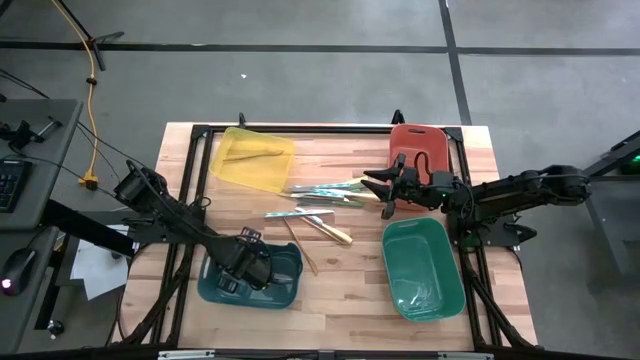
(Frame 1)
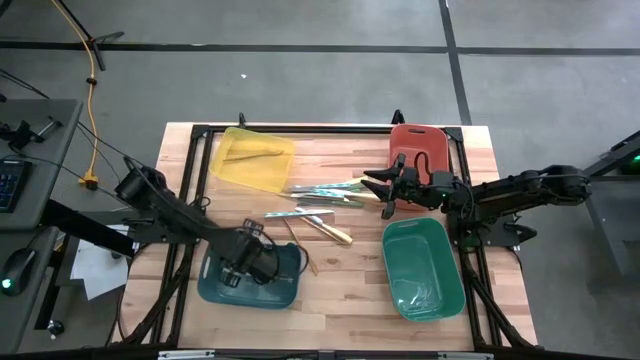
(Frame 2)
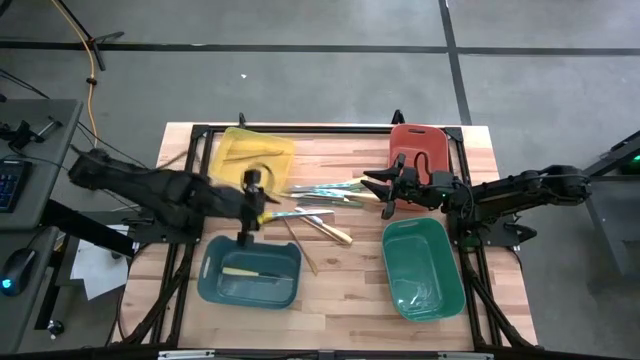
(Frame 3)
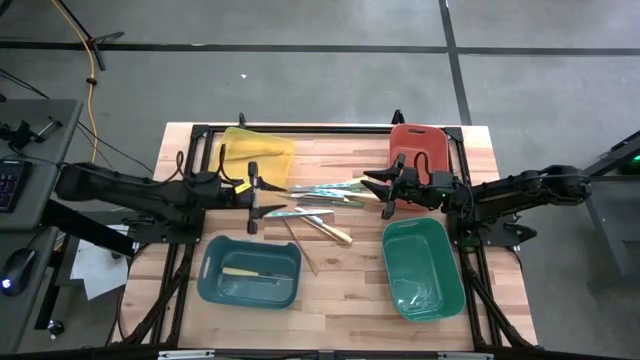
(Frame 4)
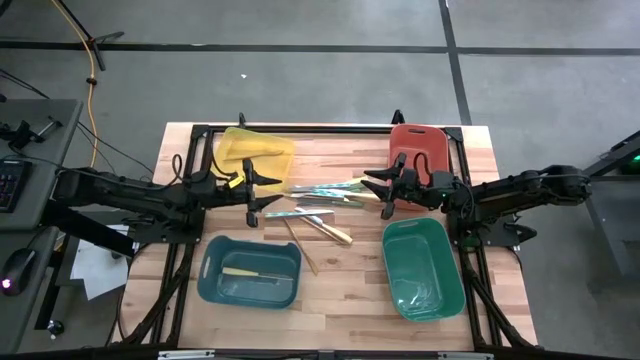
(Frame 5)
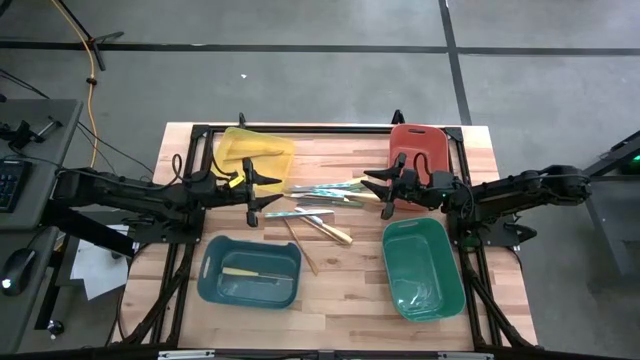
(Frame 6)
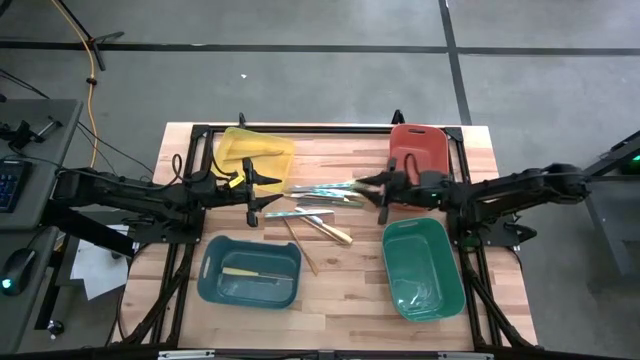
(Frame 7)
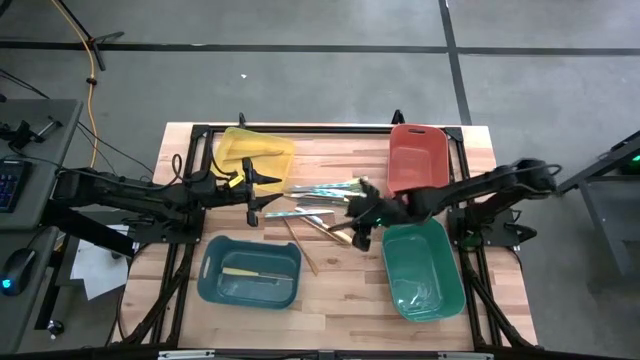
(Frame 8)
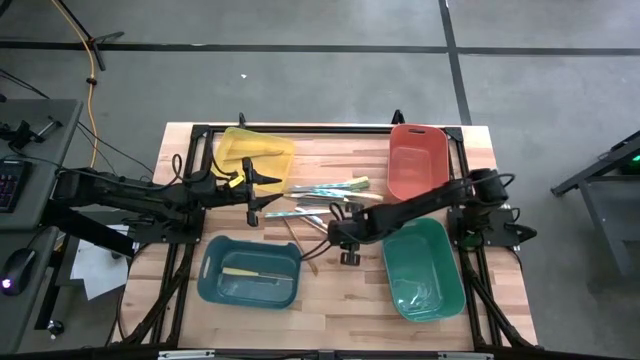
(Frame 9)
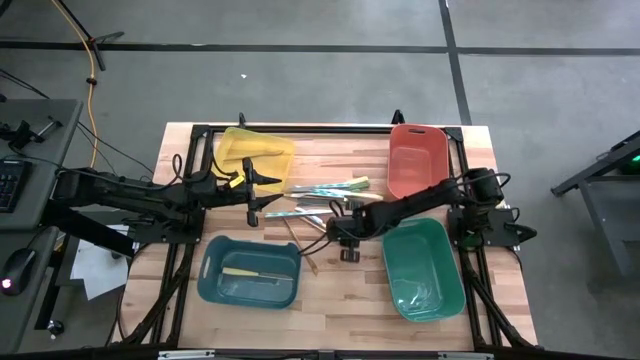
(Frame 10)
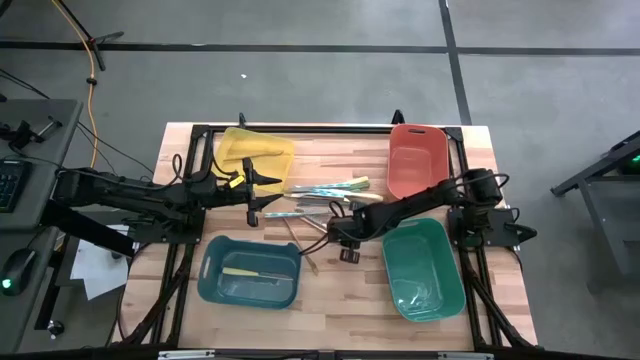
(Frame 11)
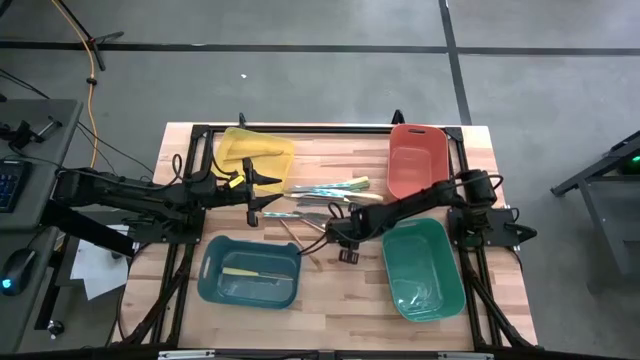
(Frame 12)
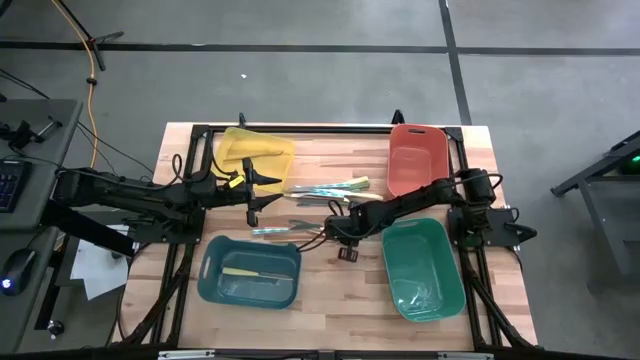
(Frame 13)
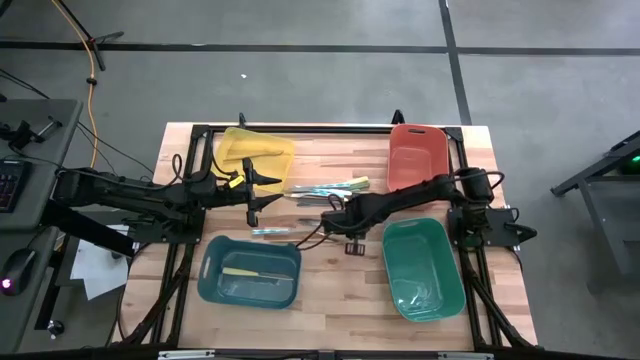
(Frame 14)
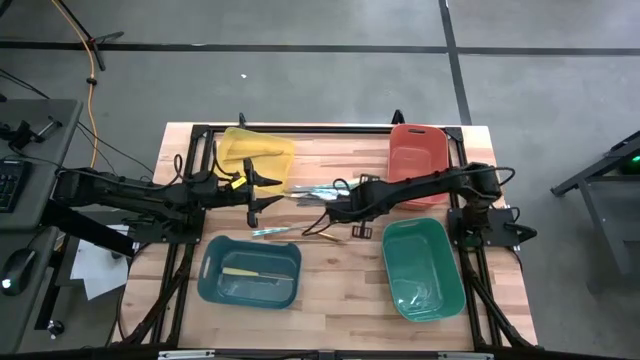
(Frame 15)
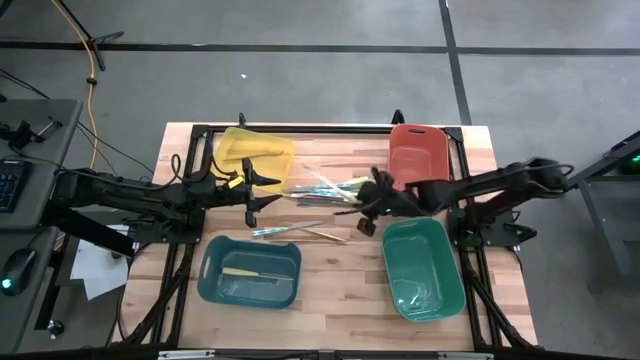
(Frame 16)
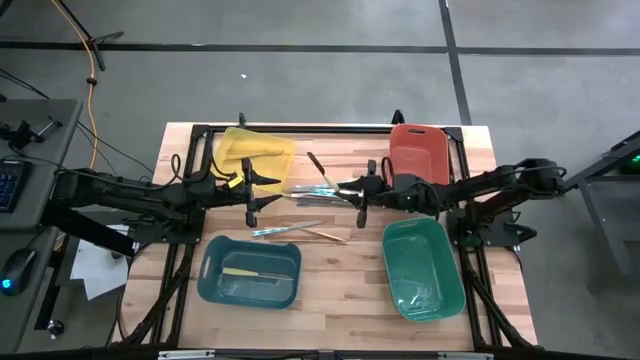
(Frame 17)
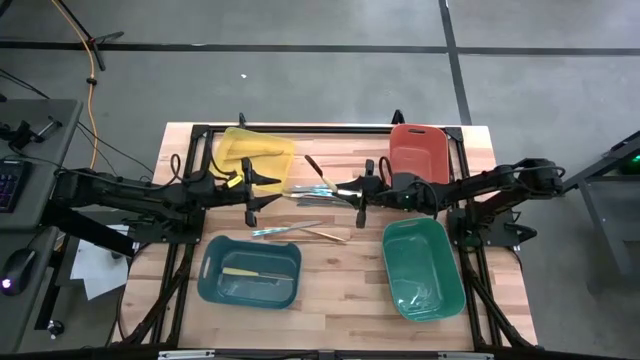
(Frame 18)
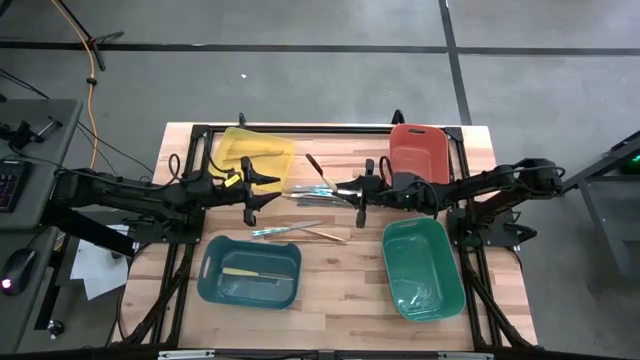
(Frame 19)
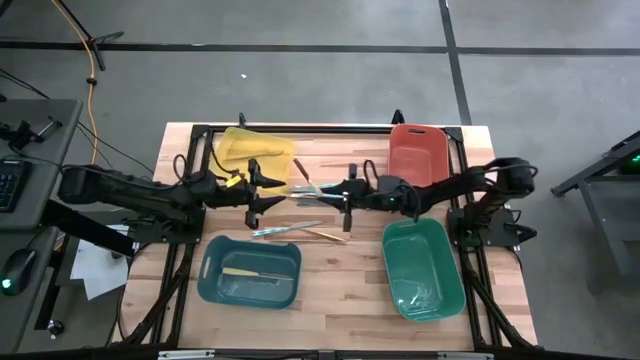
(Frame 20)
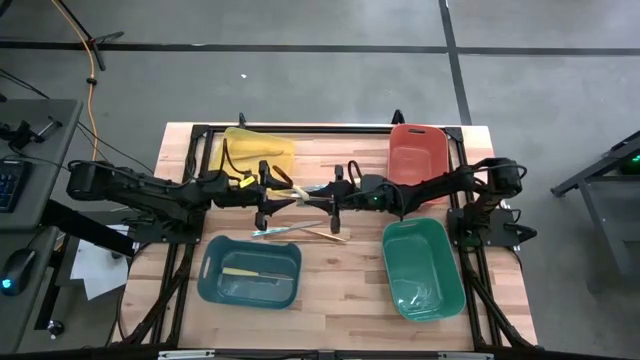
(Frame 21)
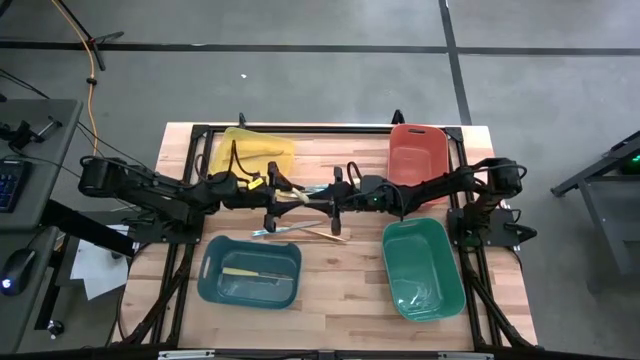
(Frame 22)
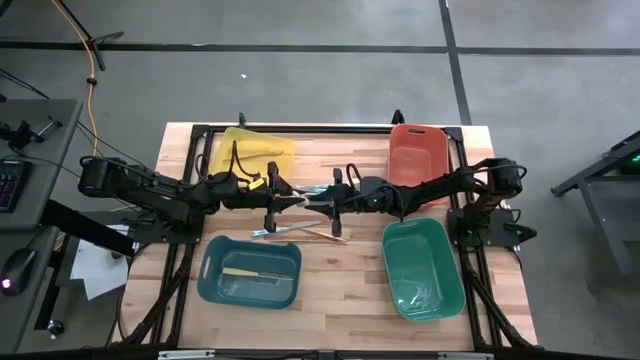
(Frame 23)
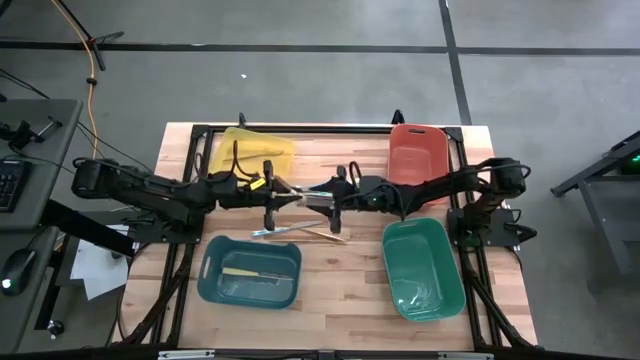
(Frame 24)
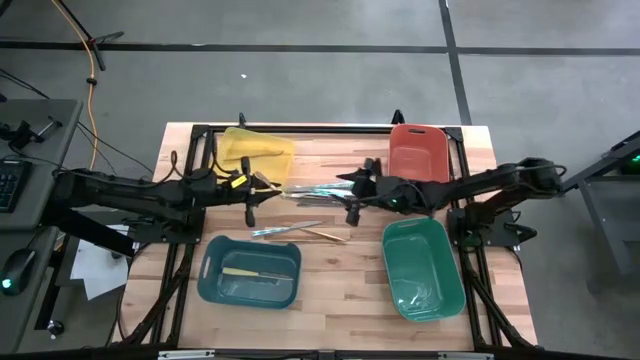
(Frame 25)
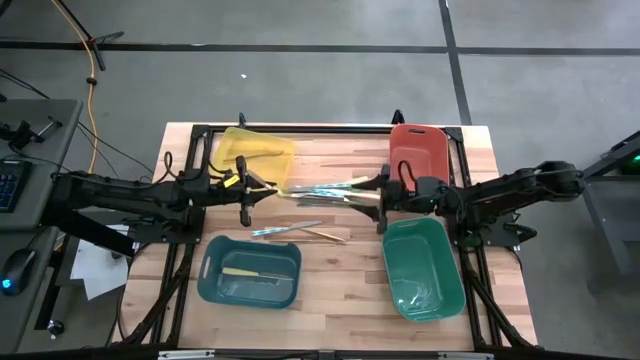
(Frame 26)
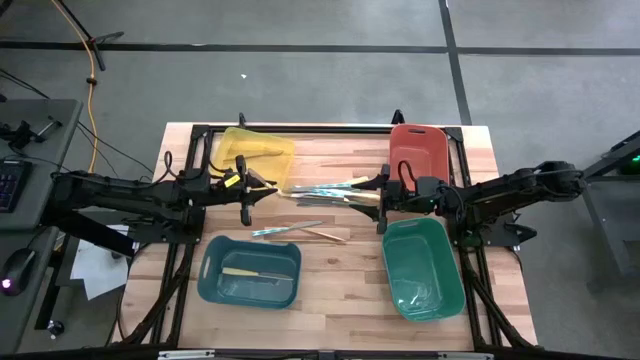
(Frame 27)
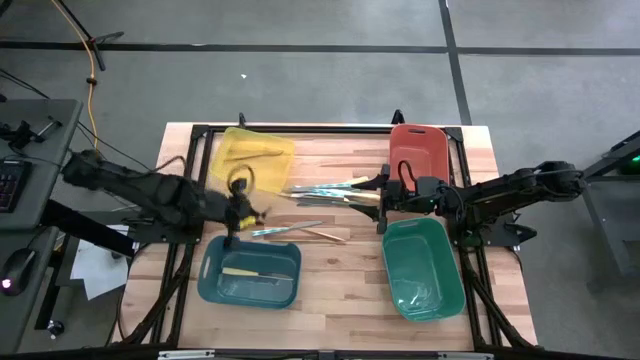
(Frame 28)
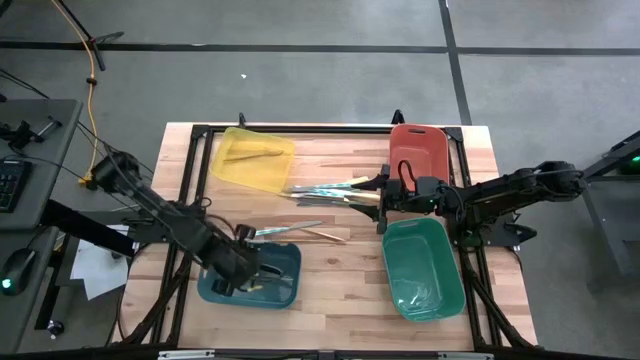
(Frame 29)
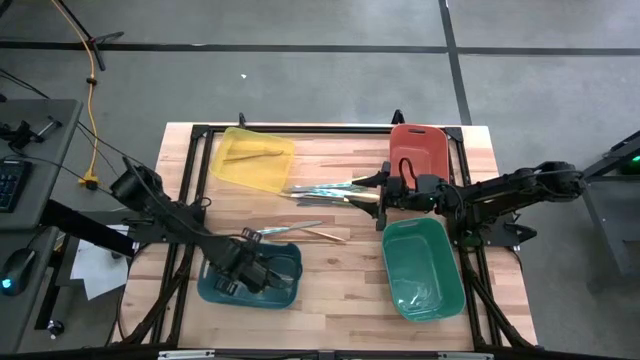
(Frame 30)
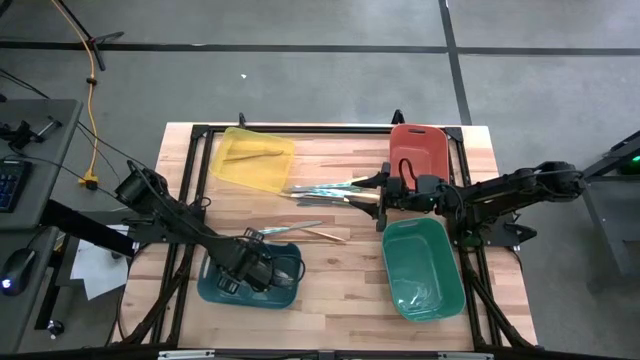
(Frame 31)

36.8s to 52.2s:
Task: Sort silverware by color (type)
Put the yellow knife into the blue bin

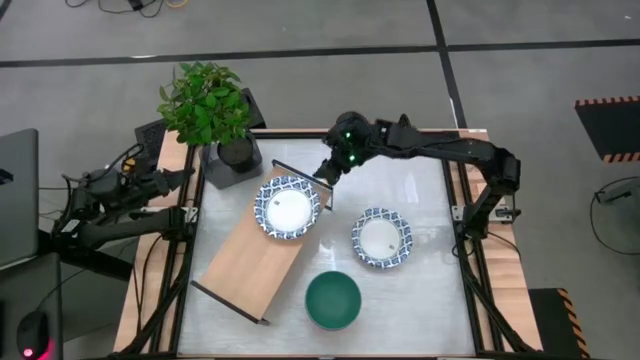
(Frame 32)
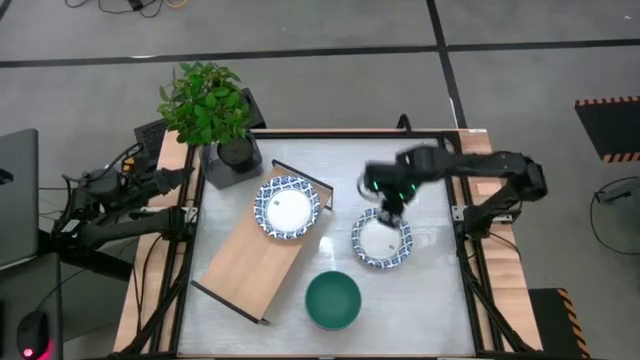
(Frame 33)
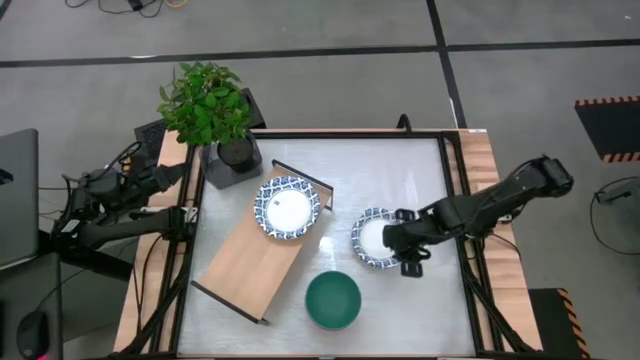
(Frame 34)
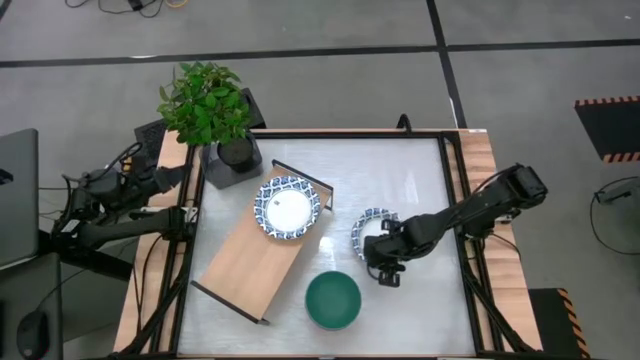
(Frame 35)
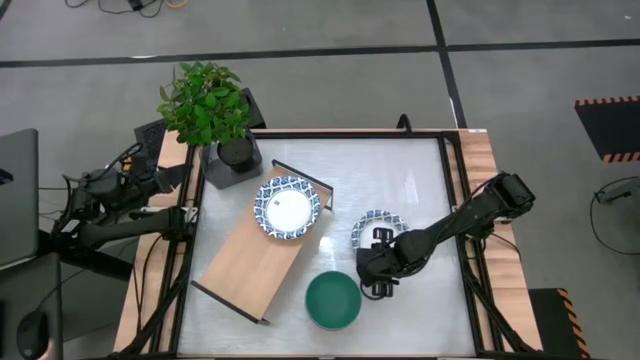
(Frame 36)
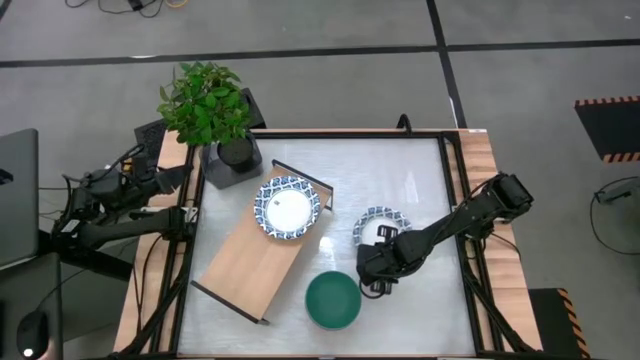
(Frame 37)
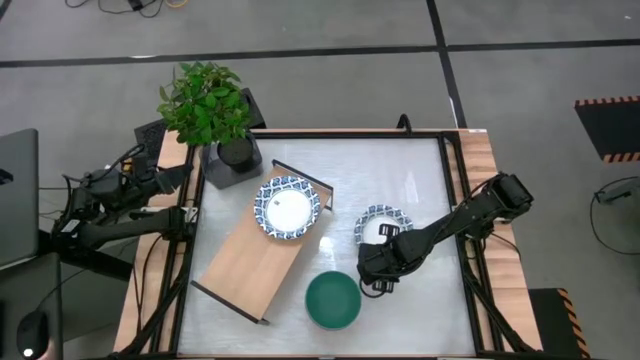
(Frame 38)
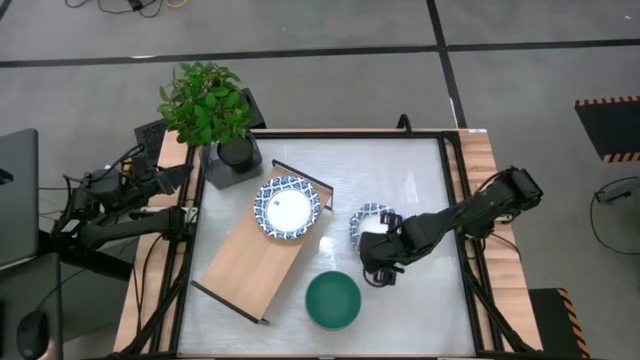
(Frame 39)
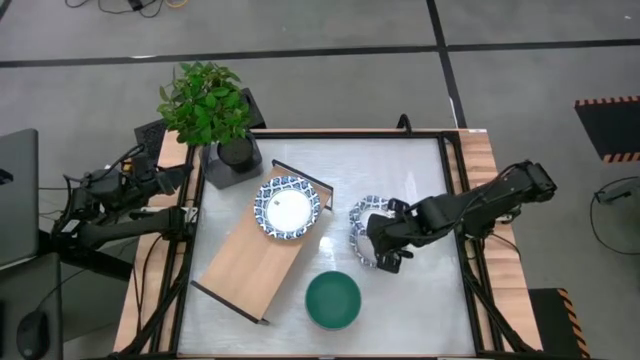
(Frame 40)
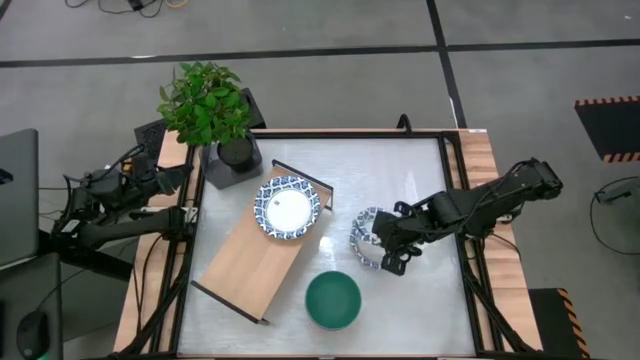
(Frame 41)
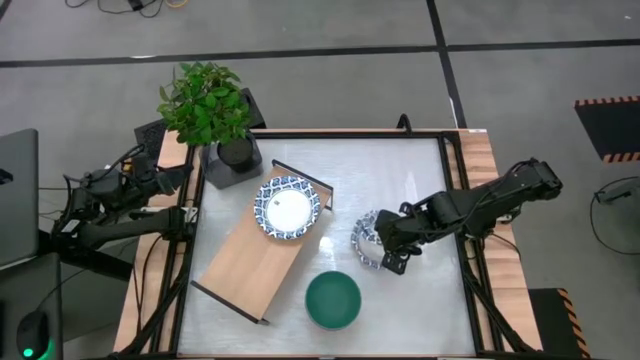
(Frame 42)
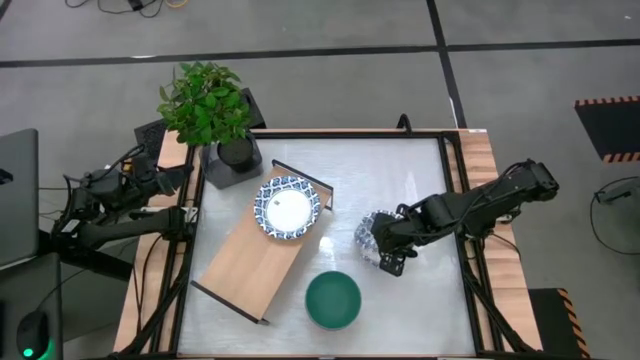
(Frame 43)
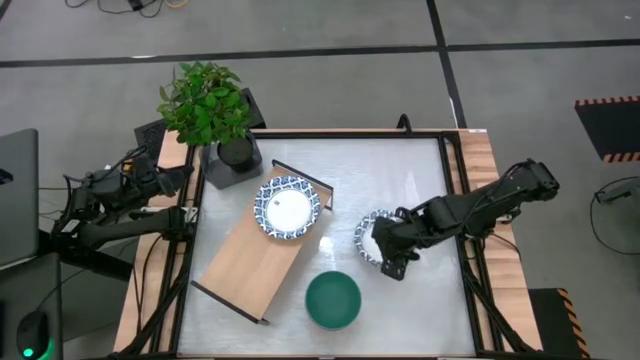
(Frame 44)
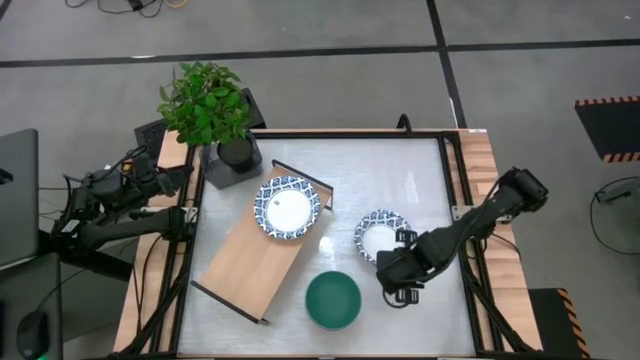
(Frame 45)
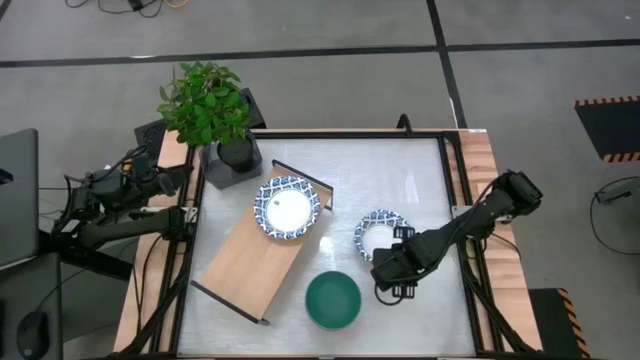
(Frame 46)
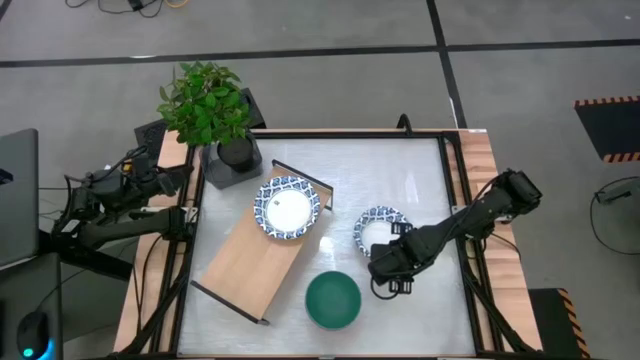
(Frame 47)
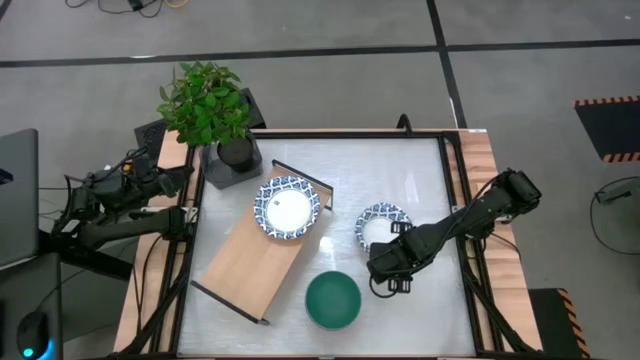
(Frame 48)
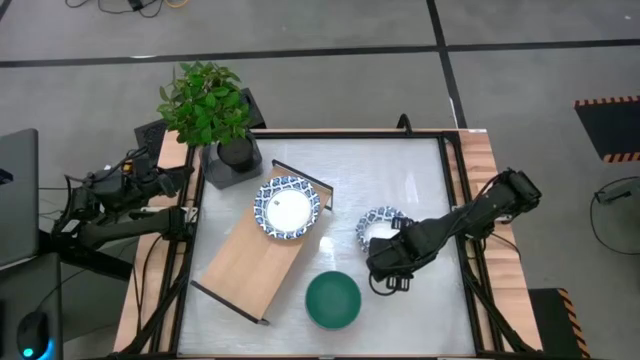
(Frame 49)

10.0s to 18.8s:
Task: Place and stack bowls onto a shelf
Stack the white patterned bowl on the white patterned bowl on the shelf
